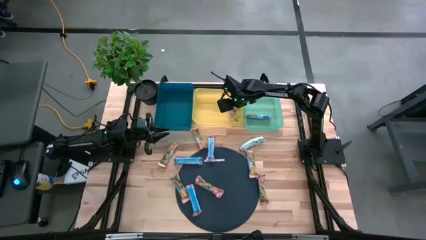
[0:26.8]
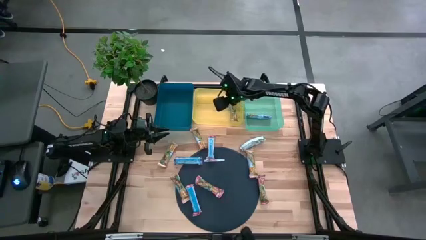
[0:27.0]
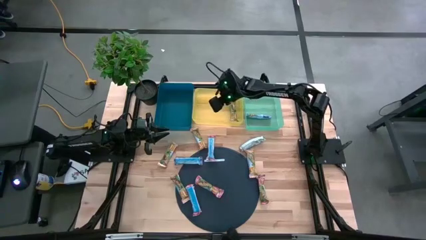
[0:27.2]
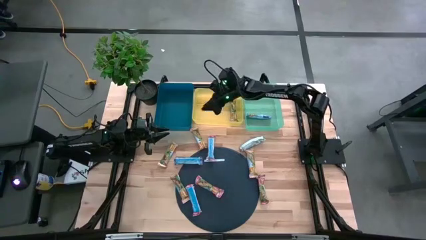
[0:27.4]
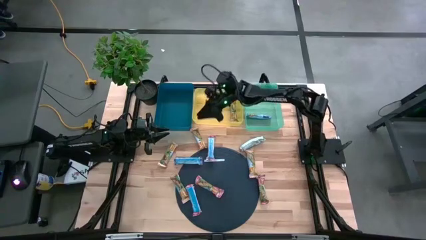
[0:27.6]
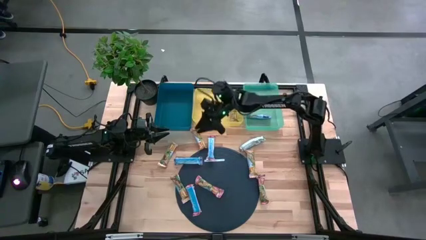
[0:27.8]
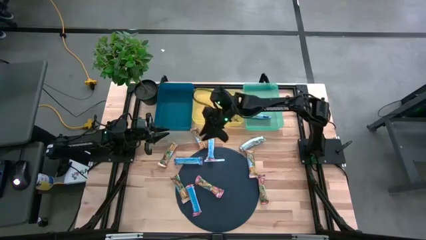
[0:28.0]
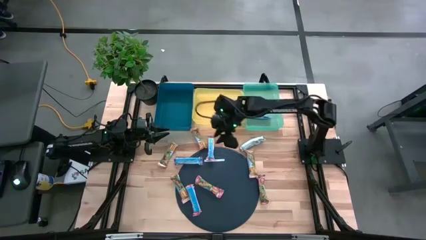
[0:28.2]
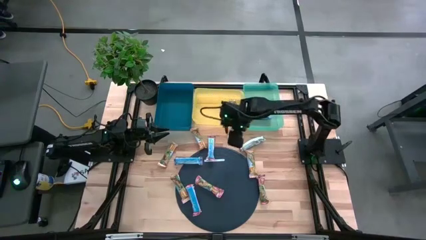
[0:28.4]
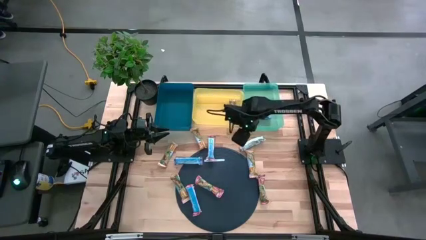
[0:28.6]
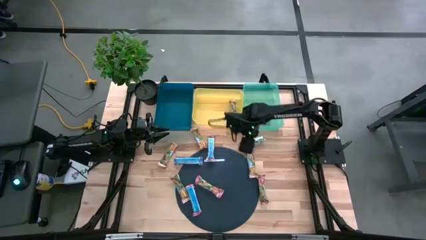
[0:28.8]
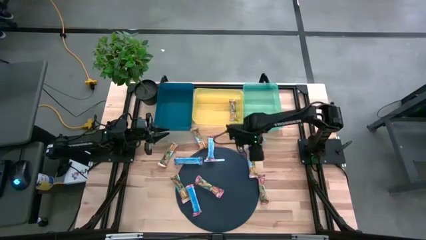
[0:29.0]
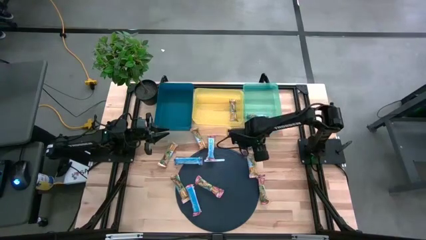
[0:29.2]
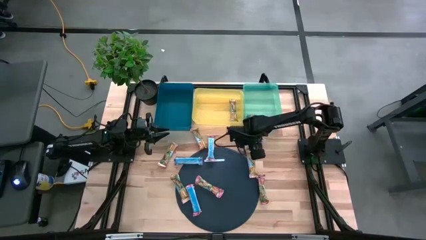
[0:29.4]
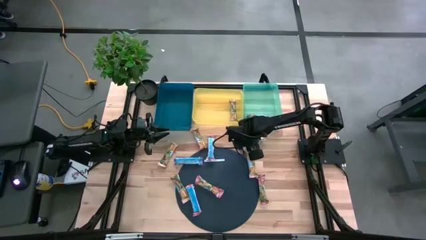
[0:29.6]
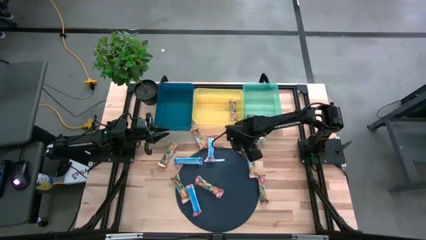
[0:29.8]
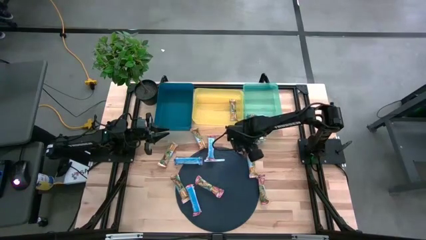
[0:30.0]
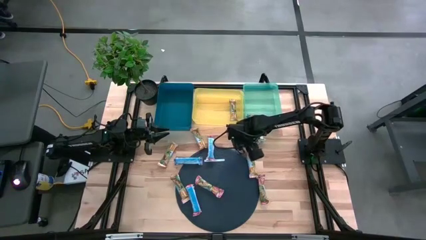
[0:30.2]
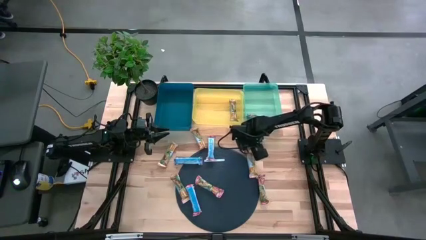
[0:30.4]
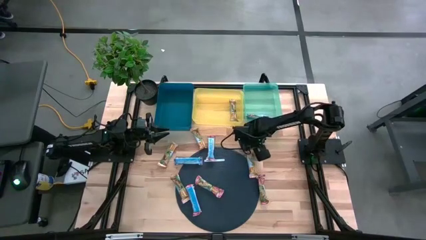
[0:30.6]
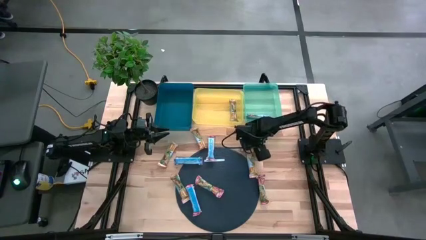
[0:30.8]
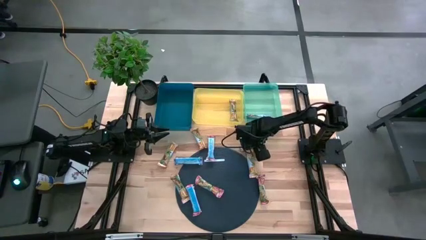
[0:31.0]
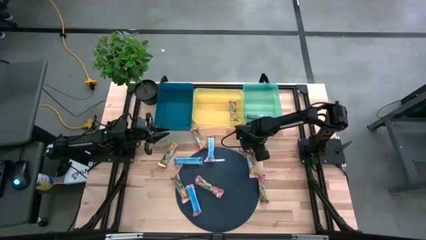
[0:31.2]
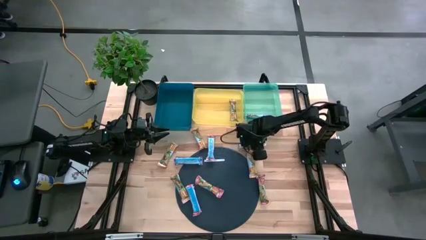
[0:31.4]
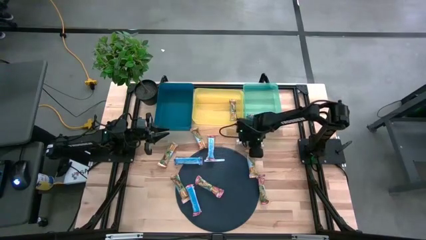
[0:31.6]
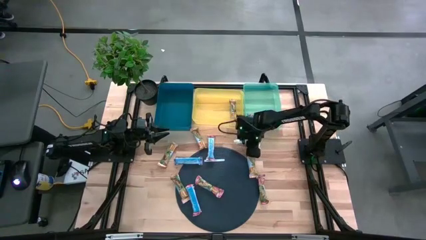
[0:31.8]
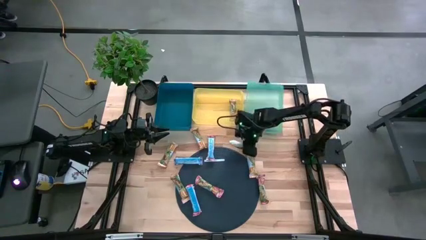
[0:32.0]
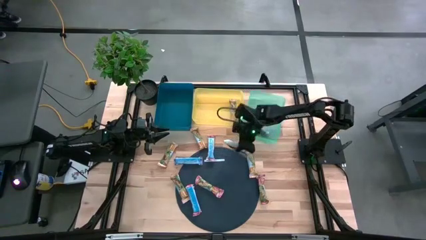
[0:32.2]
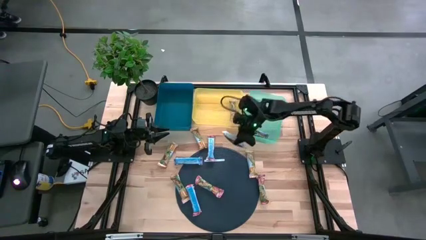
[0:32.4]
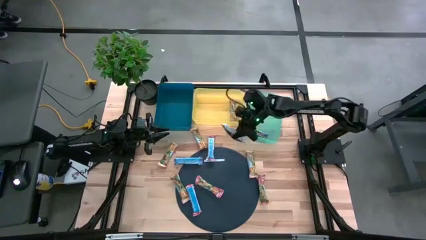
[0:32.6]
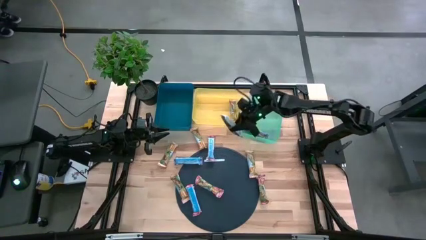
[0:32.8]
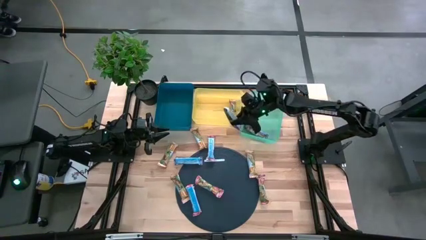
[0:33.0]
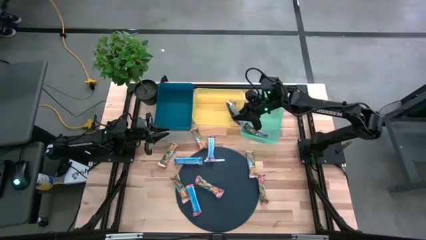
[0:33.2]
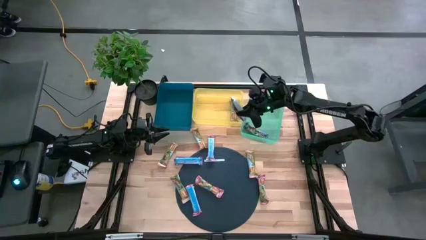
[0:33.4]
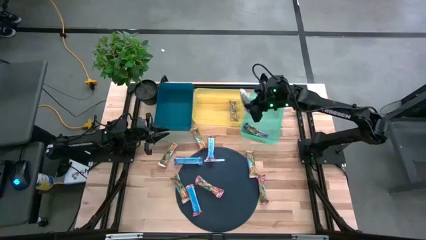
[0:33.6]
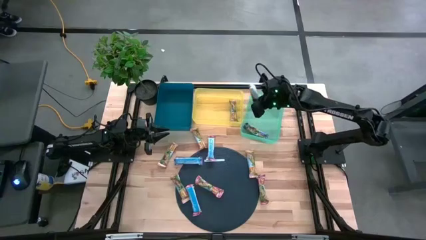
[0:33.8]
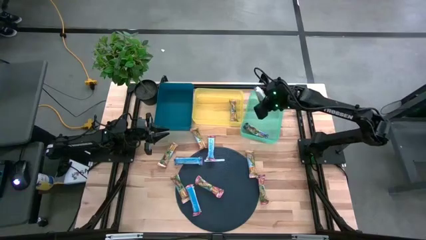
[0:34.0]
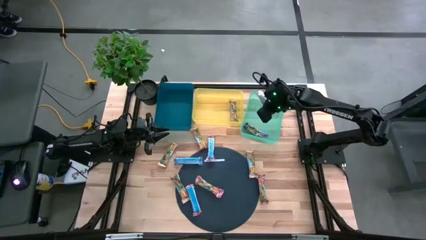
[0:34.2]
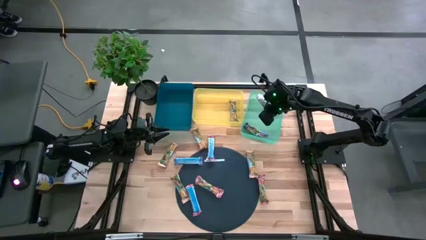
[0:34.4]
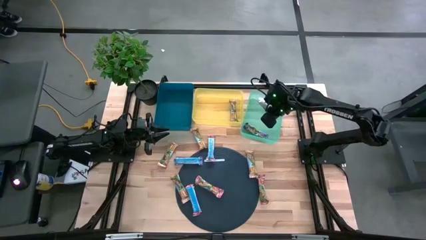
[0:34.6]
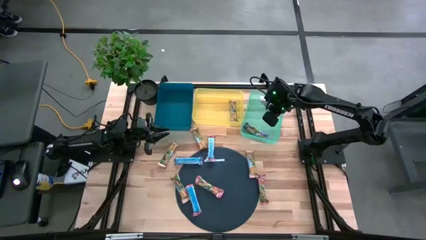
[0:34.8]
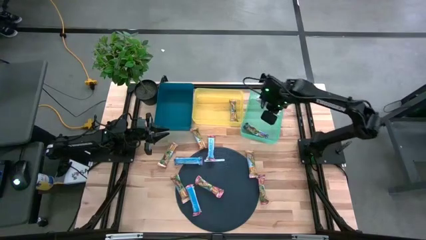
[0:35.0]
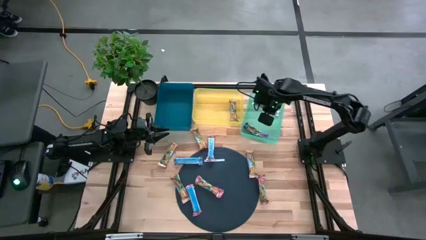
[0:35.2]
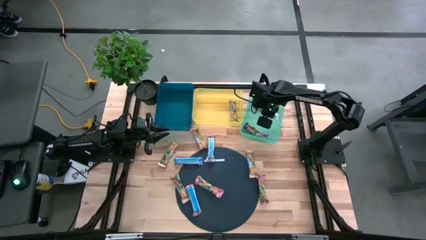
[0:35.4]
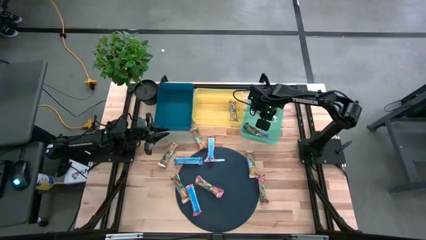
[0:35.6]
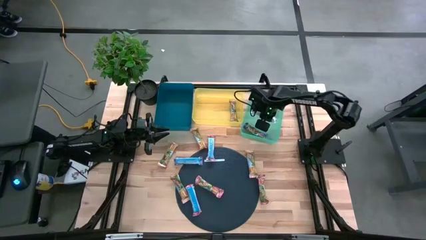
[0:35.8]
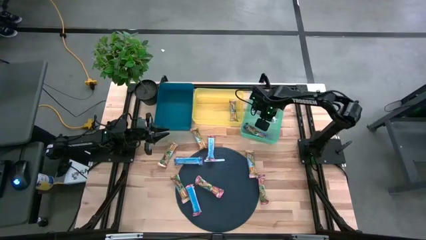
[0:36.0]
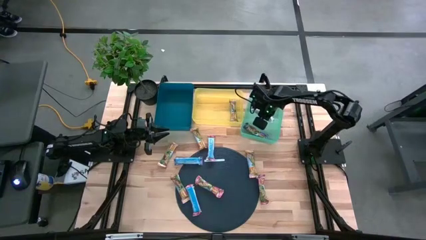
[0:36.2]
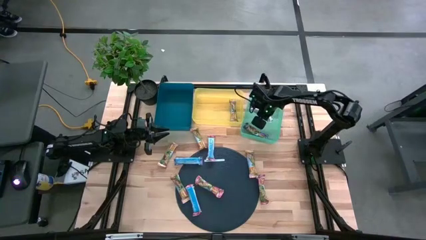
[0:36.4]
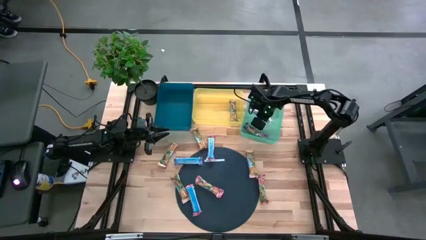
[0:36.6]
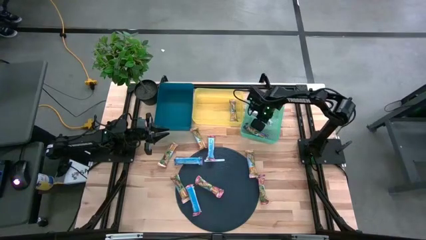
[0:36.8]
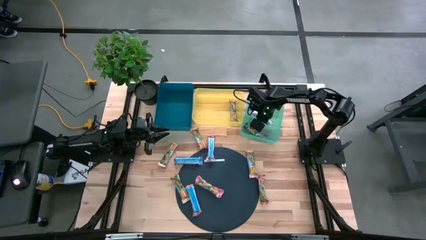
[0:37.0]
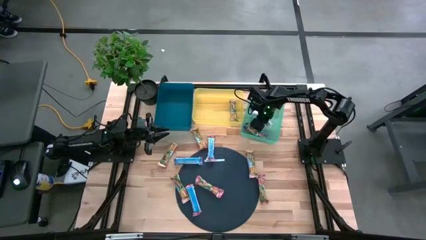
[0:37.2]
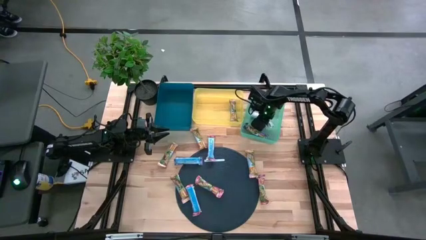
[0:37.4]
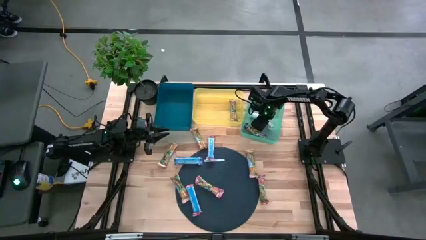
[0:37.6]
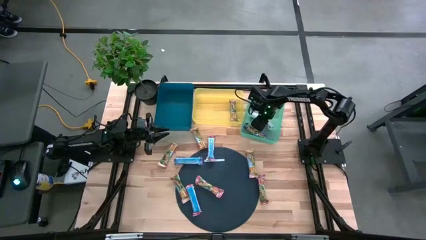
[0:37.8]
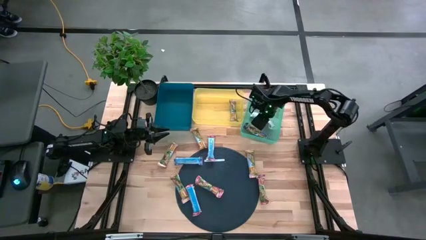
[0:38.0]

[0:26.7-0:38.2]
Task: Pick and place Granola Bars by type
Put the violet granola bar into the green bin

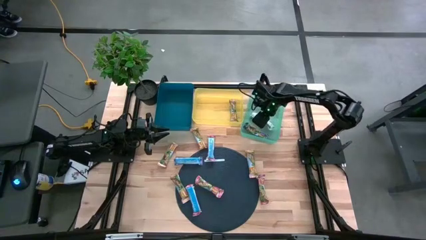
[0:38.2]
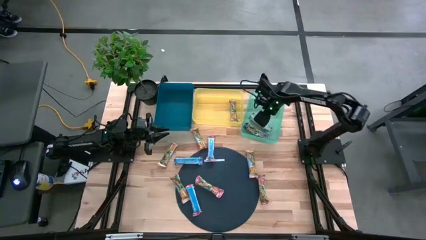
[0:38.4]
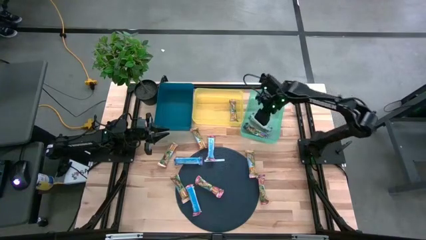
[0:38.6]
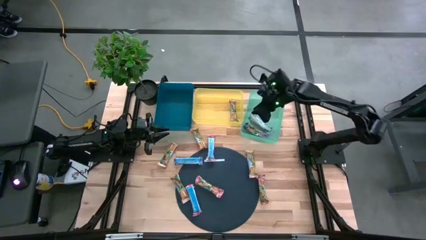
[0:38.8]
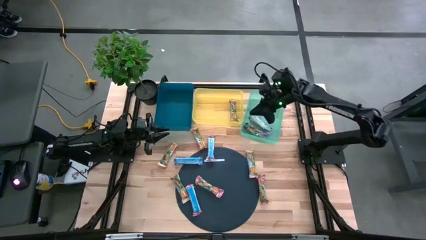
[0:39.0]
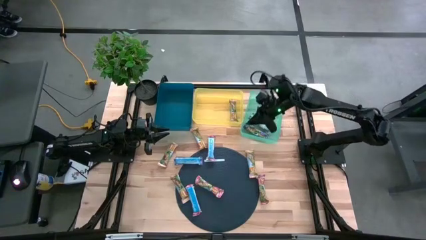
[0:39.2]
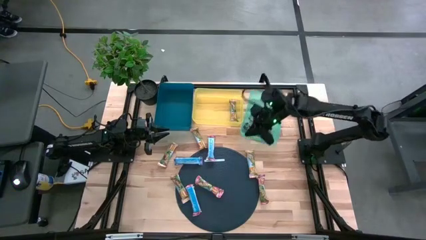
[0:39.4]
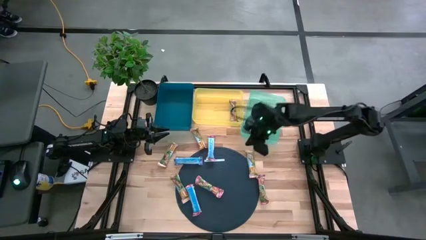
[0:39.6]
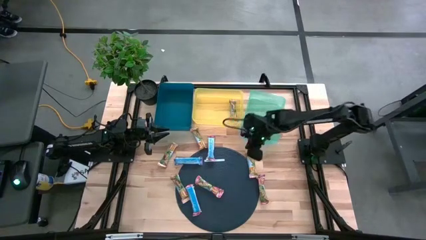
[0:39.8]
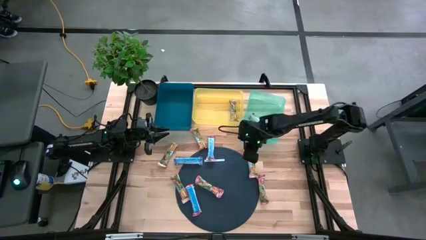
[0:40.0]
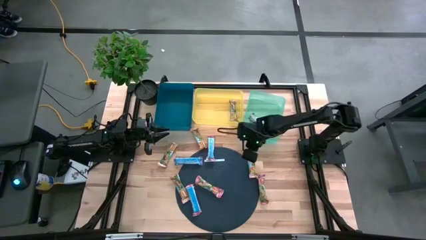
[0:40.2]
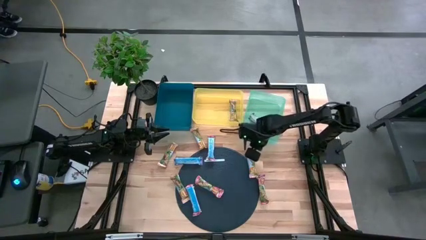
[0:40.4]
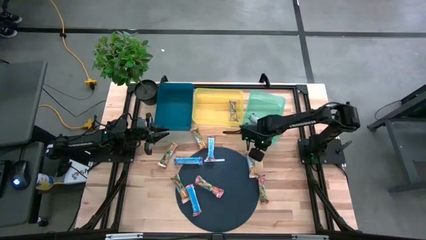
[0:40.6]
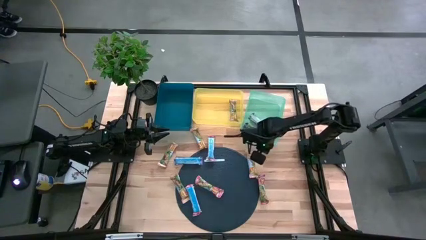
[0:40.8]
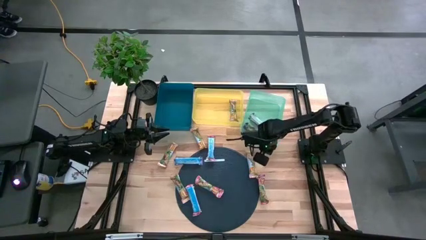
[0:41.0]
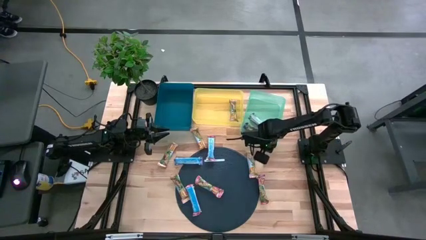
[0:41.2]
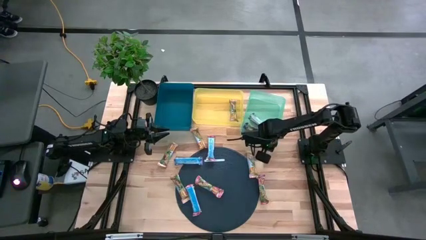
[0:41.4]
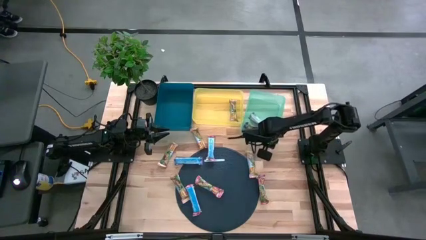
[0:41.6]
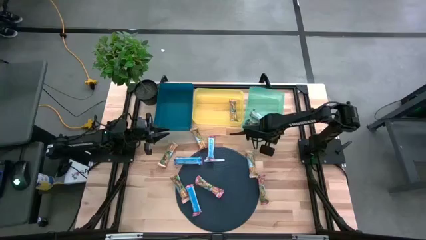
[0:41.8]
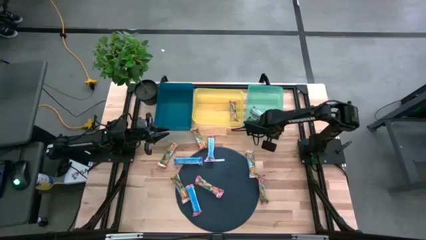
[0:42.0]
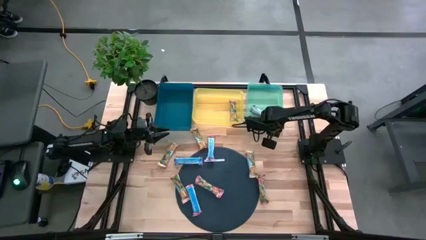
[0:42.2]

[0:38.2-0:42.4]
Adjust the green bin
